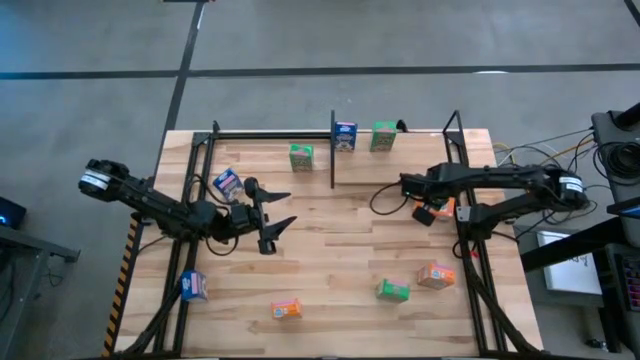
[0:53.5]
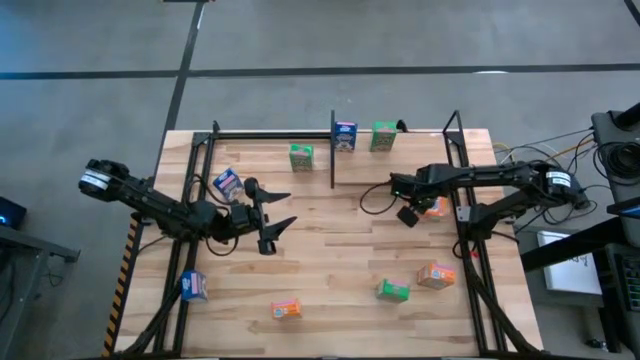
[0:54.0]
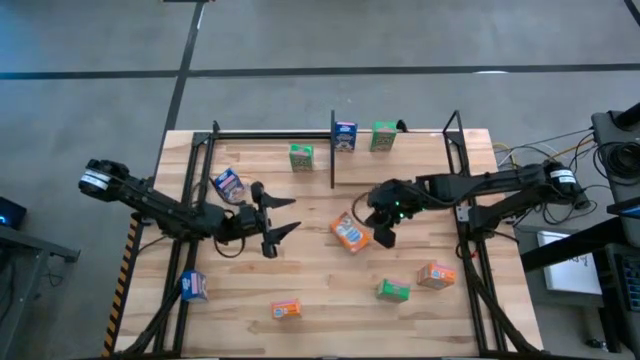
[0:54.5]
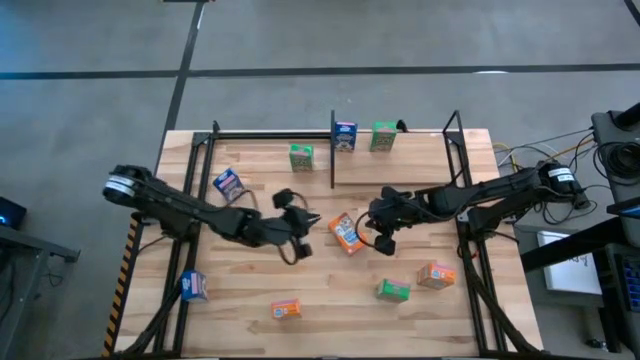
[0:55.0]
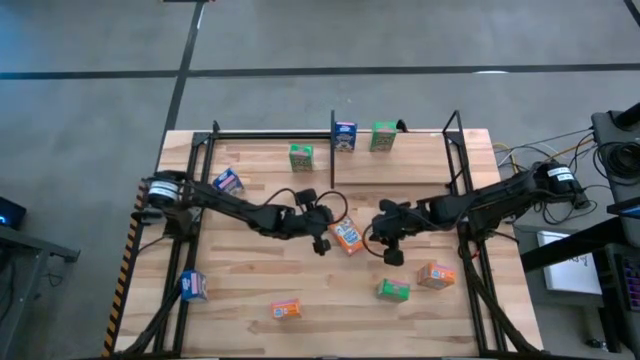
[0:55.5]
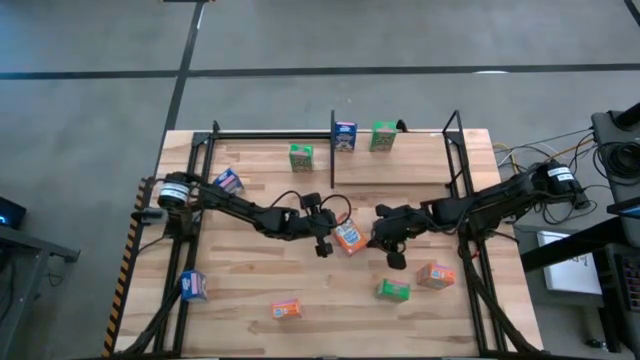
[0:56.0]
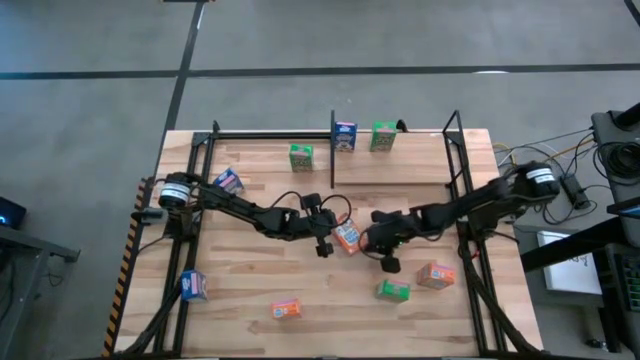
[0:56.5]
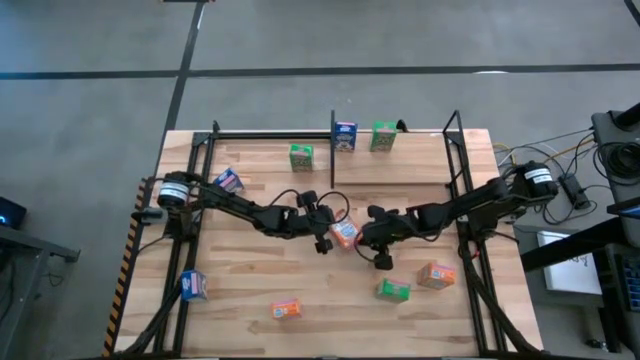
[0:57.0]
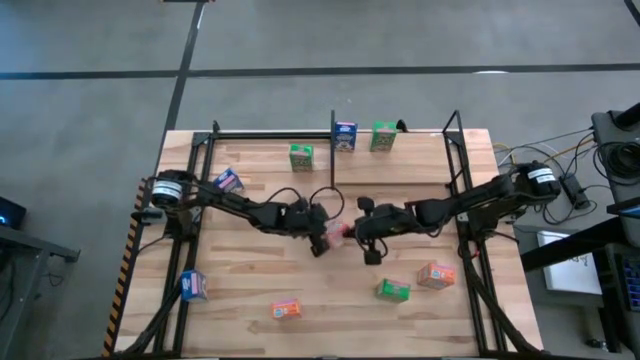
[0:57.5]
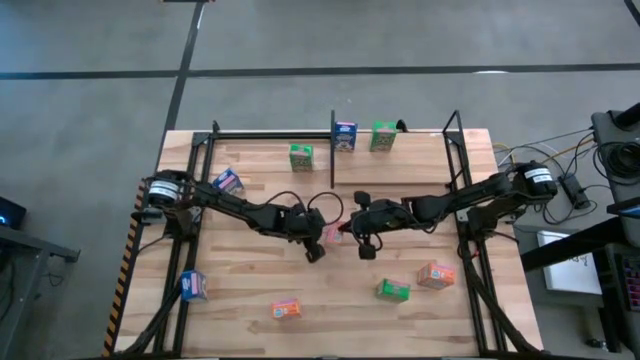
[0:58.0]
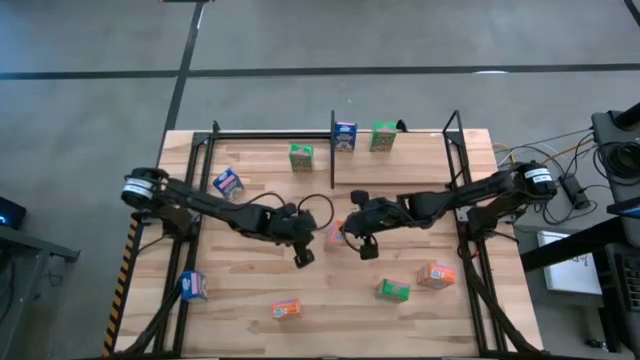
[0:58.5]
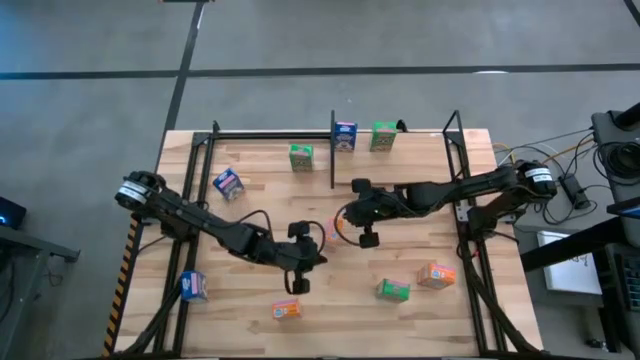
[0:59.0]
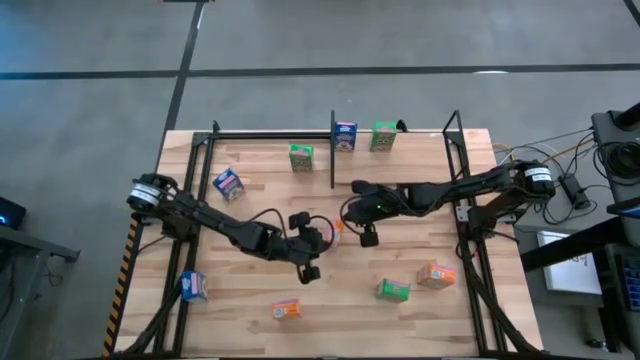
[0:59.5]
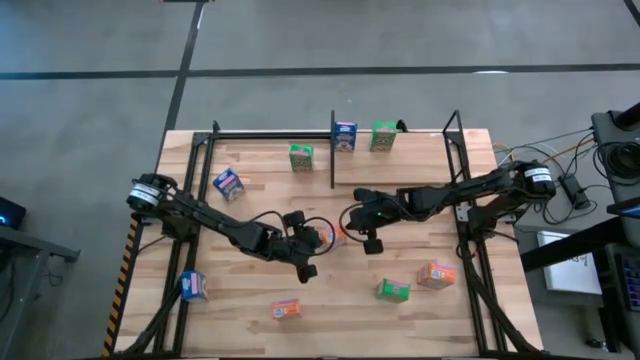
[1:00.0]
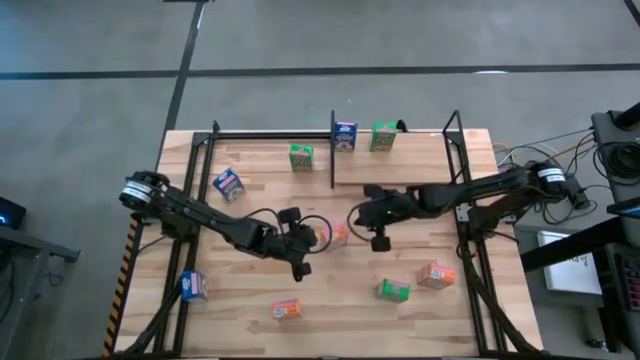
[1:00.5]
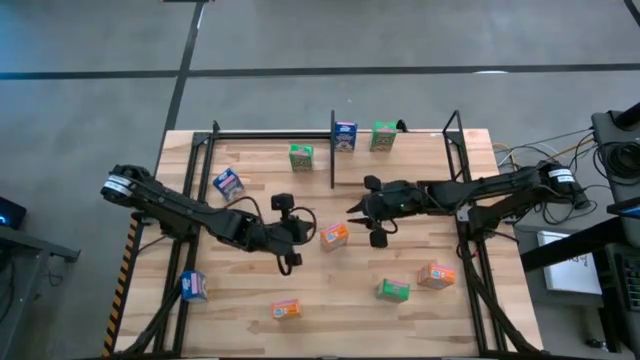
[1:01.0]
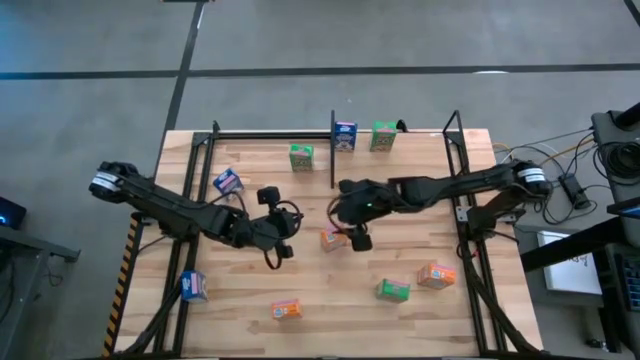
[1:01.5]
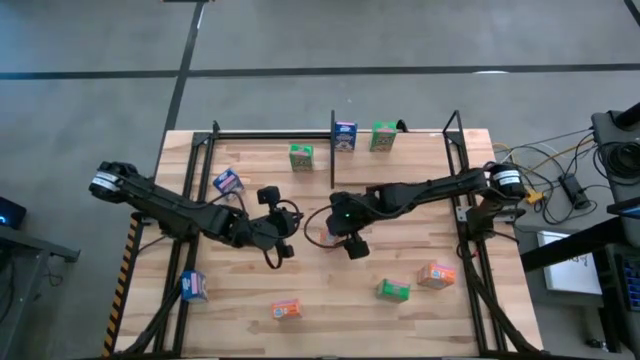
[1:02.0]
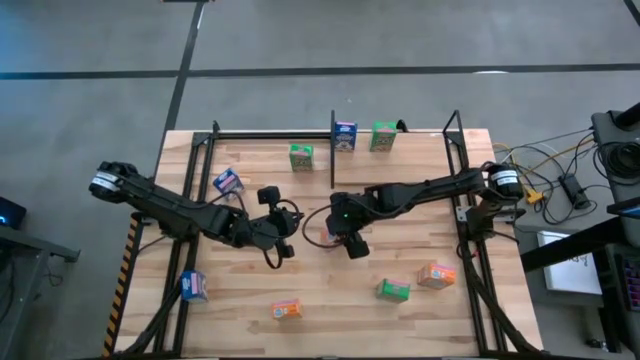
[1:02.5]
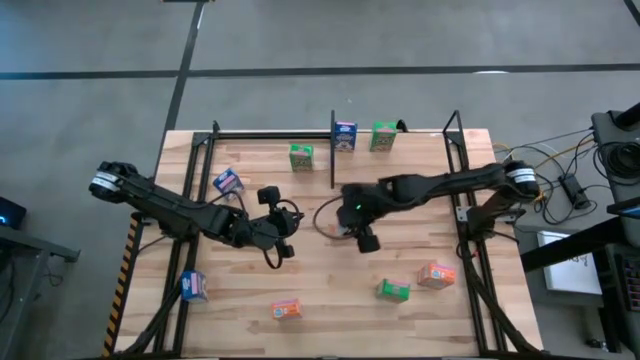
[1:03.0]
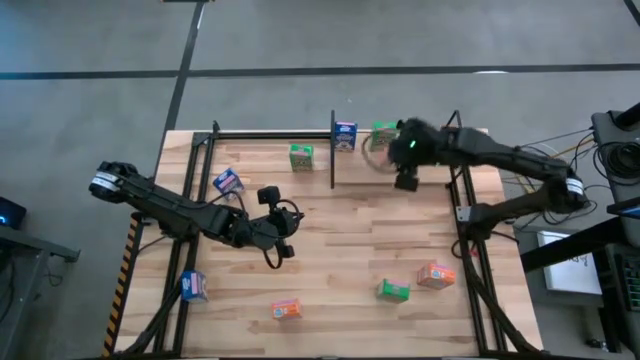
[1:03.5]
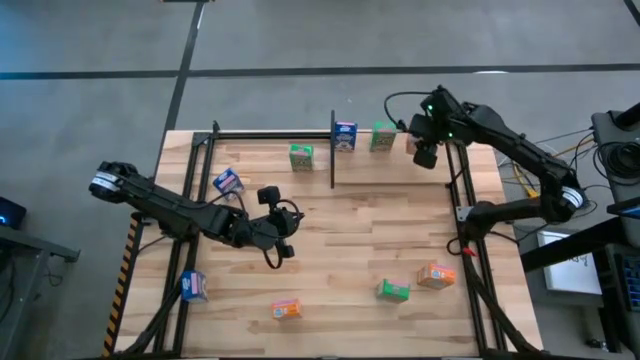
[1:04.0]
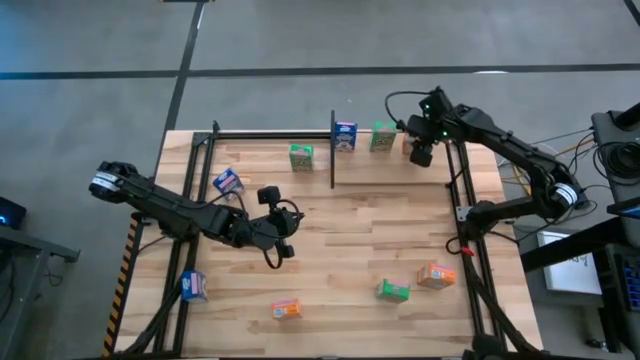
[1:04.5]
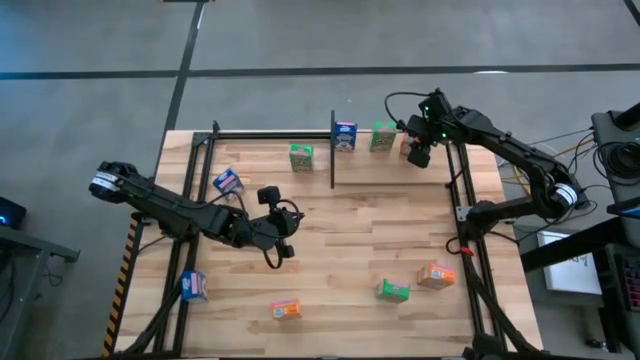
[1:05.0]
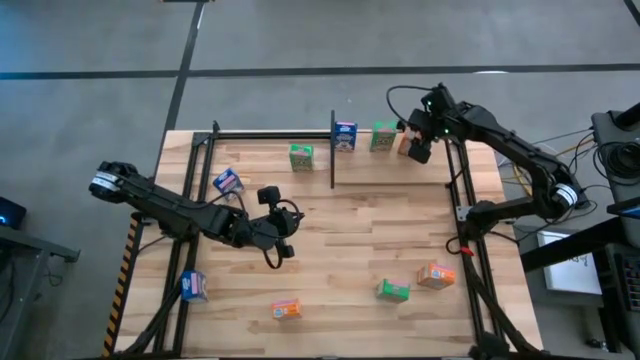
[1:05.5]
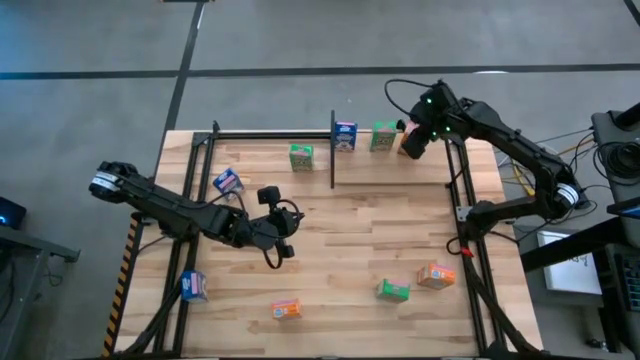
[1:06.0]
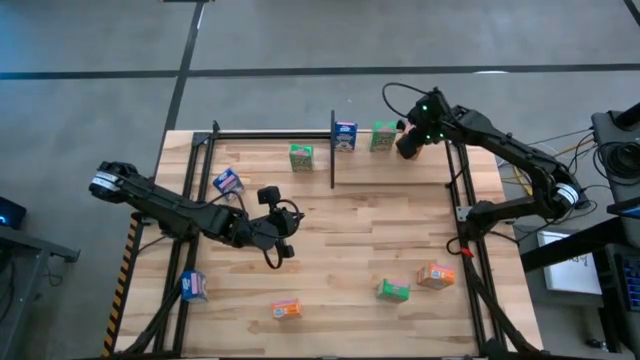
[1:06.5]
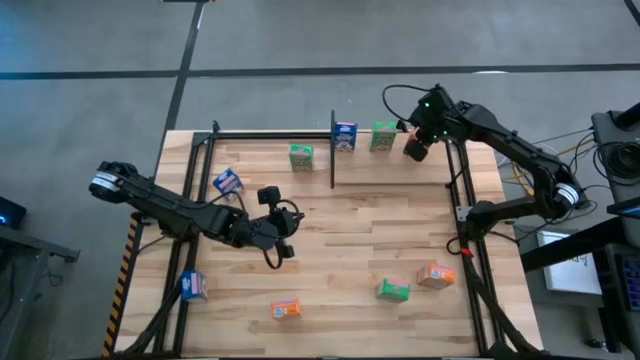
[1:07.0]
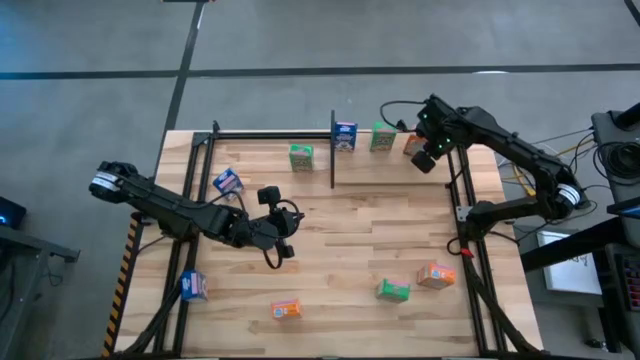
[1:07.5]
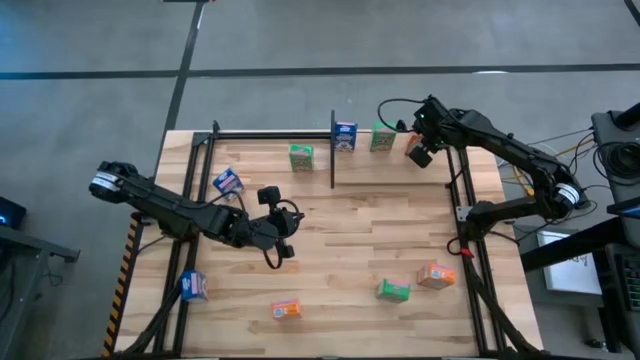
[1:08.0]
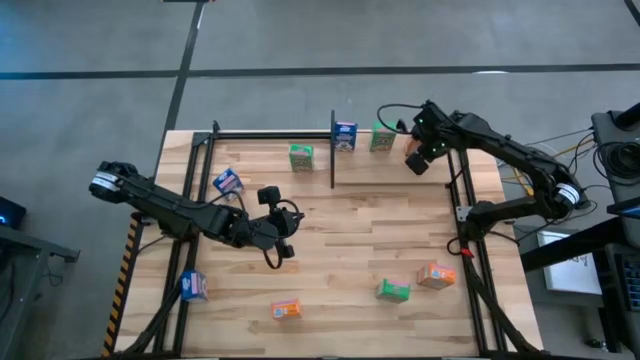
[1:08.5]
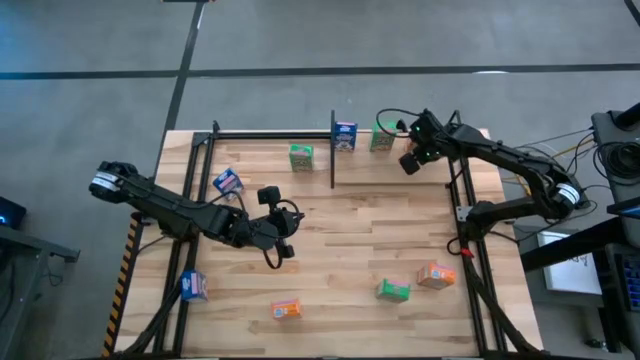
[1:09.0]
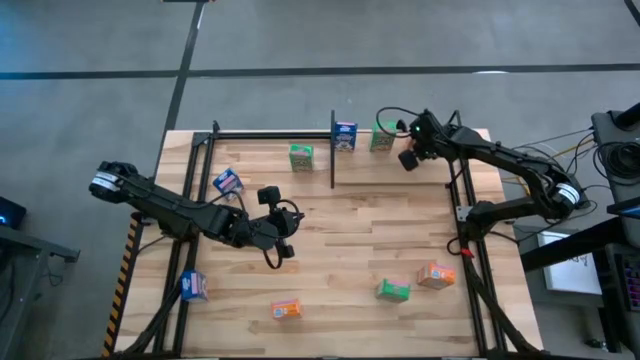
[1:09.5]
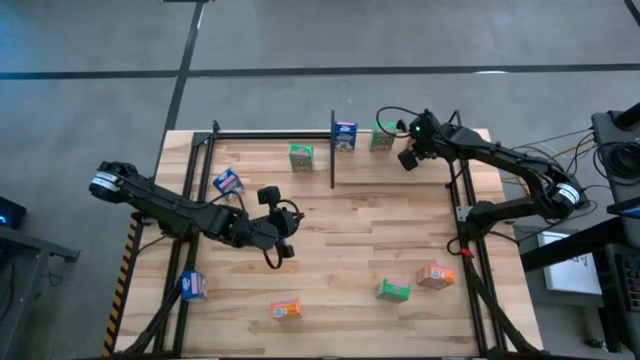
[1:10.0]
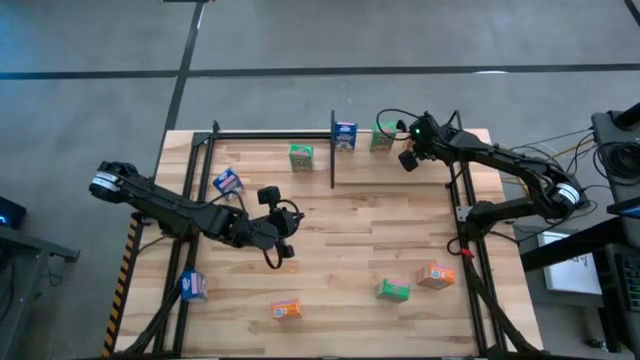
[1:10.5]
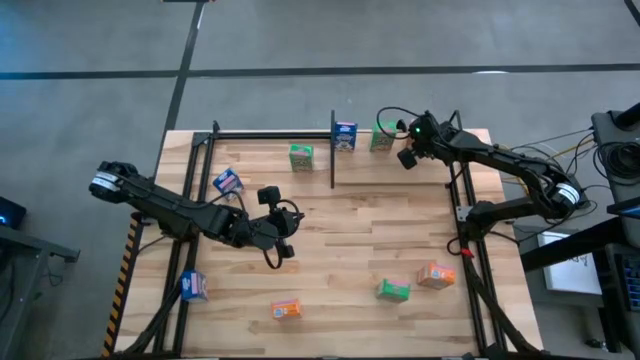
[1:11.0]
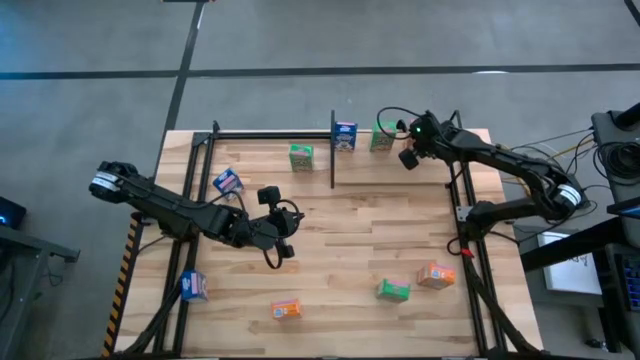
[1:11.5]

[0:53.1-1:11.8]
Task: Stack cereal on shelf
Put the center orange cereal box on the shelf
